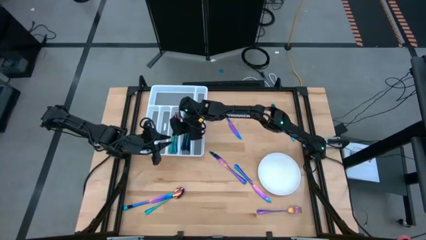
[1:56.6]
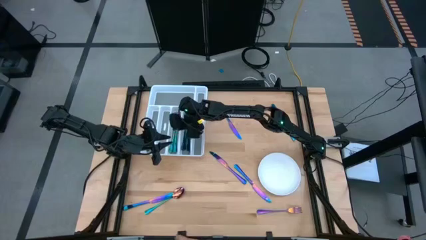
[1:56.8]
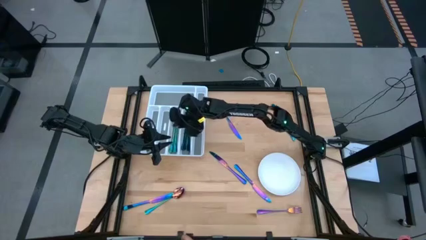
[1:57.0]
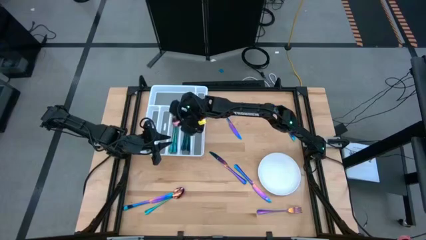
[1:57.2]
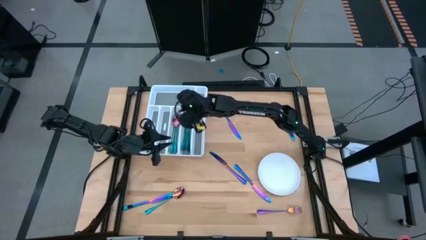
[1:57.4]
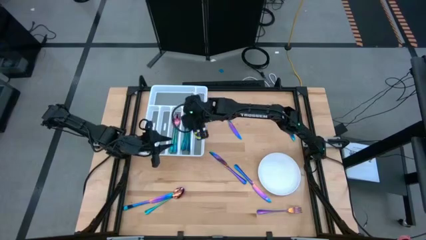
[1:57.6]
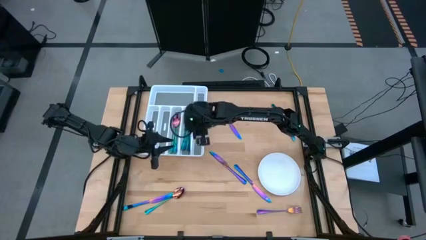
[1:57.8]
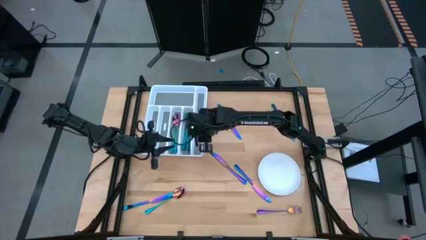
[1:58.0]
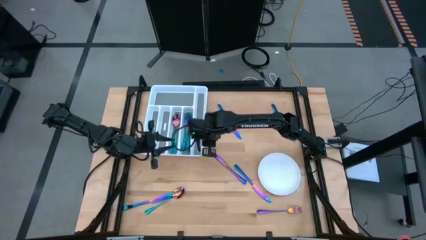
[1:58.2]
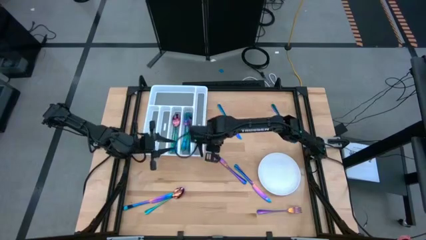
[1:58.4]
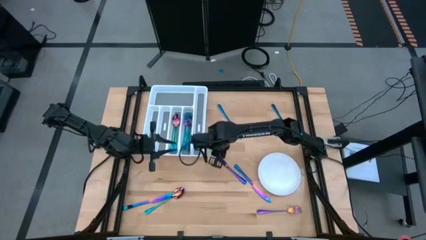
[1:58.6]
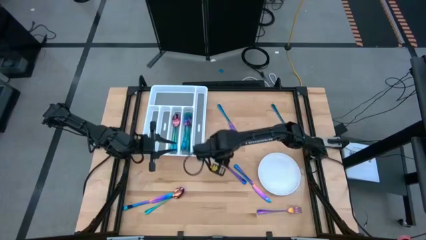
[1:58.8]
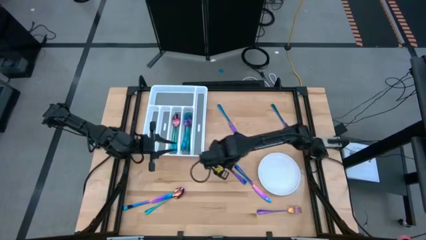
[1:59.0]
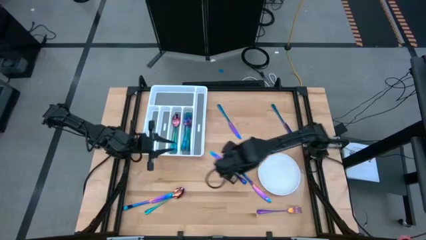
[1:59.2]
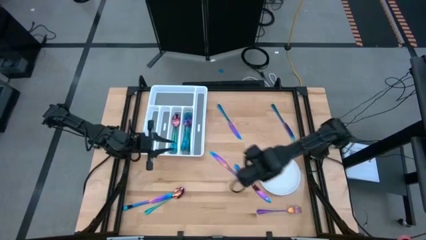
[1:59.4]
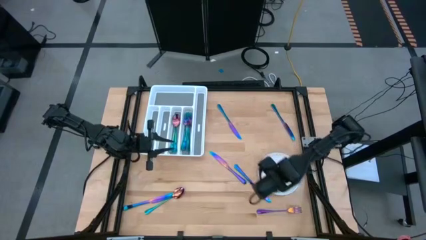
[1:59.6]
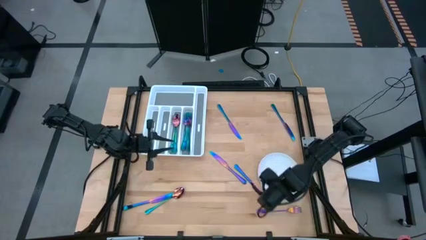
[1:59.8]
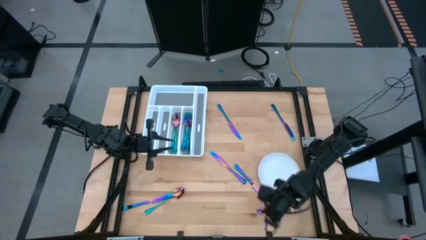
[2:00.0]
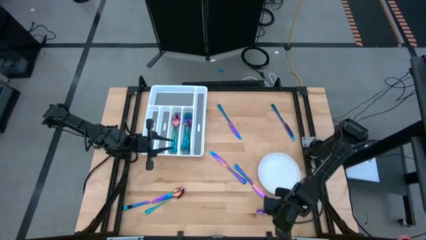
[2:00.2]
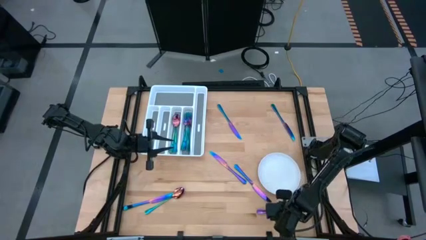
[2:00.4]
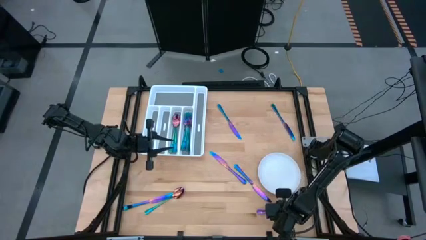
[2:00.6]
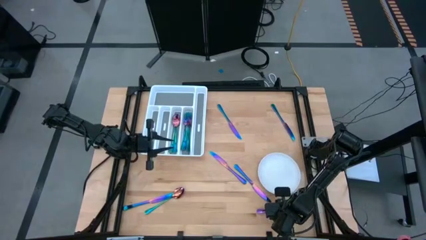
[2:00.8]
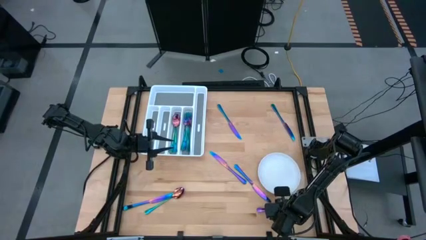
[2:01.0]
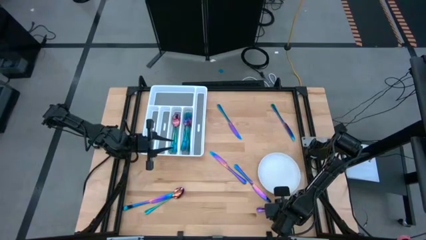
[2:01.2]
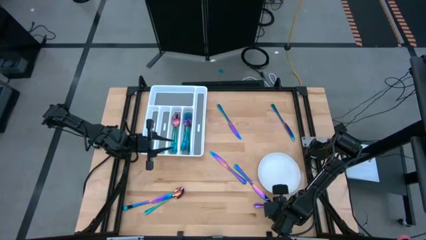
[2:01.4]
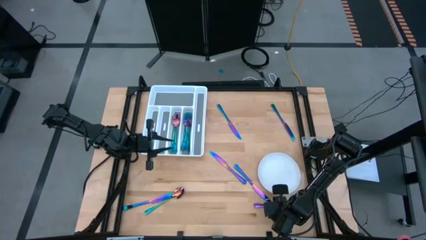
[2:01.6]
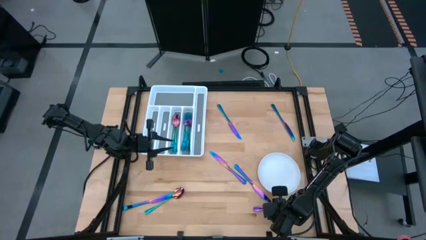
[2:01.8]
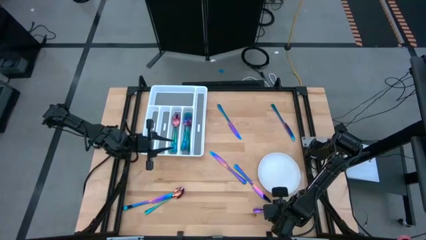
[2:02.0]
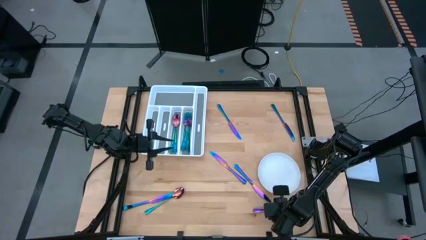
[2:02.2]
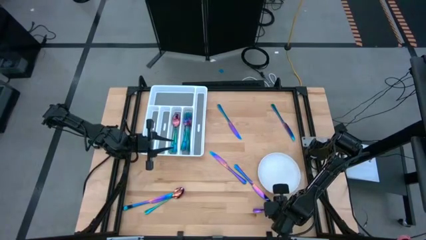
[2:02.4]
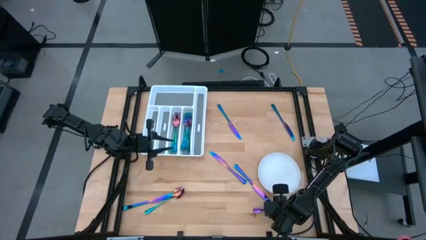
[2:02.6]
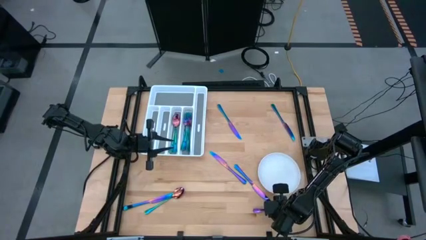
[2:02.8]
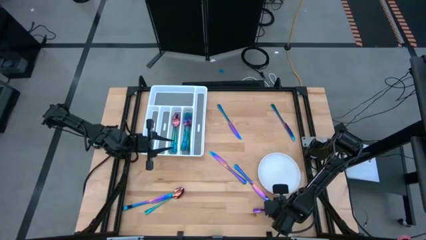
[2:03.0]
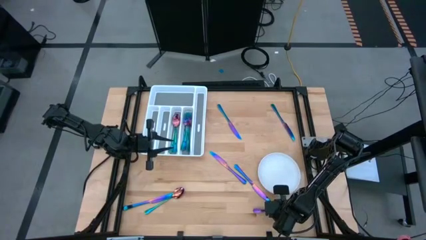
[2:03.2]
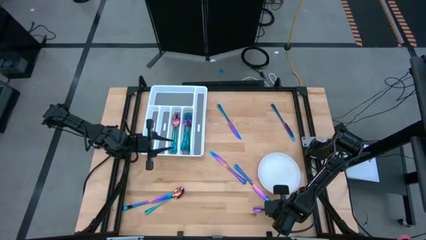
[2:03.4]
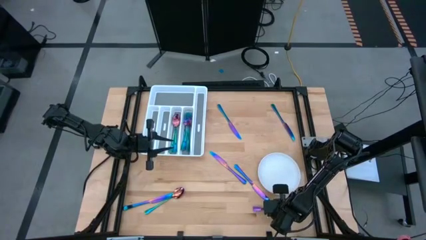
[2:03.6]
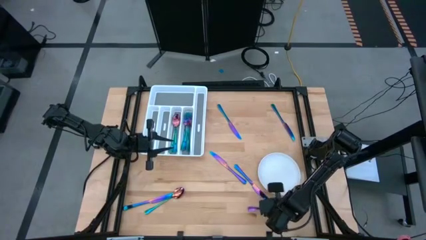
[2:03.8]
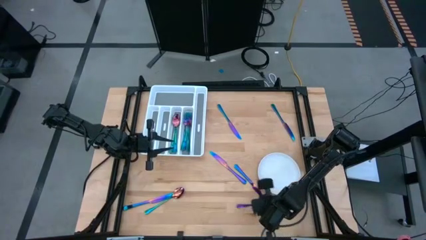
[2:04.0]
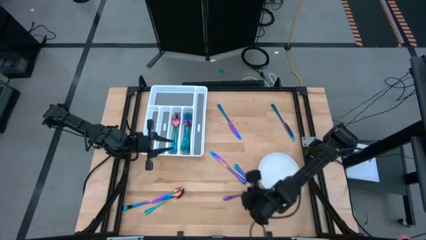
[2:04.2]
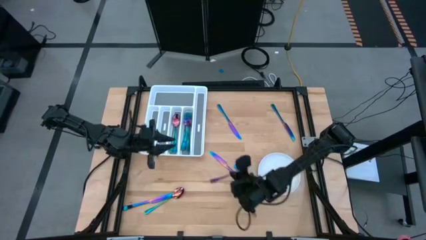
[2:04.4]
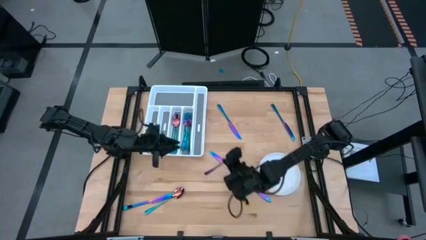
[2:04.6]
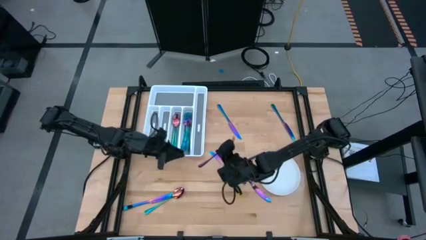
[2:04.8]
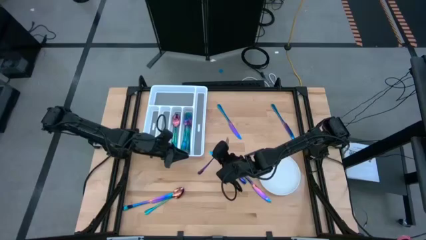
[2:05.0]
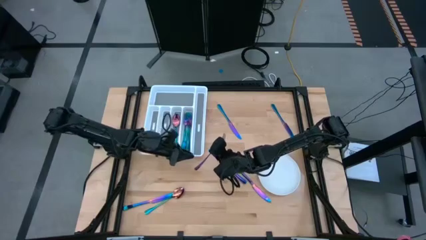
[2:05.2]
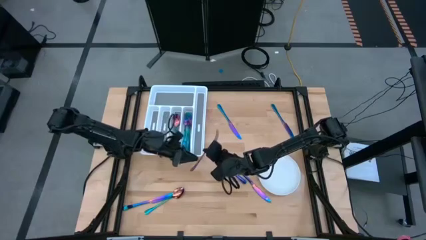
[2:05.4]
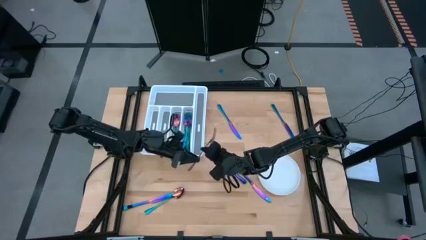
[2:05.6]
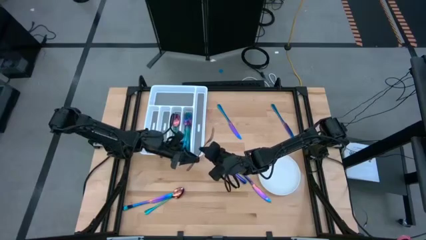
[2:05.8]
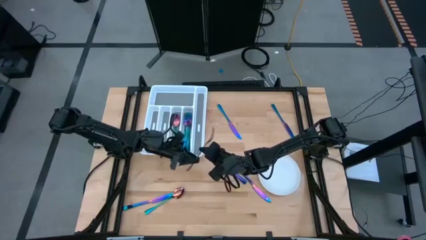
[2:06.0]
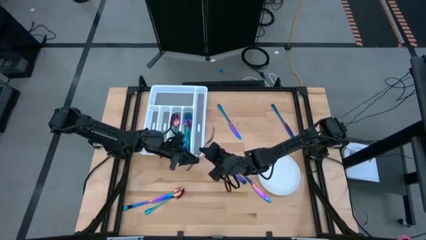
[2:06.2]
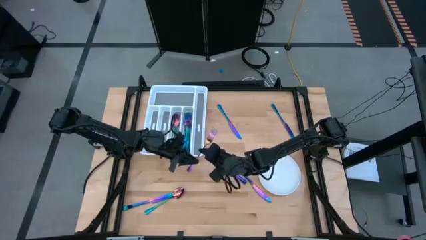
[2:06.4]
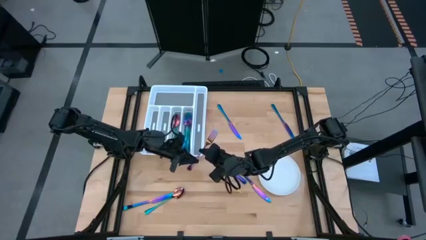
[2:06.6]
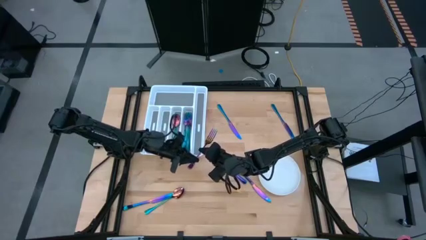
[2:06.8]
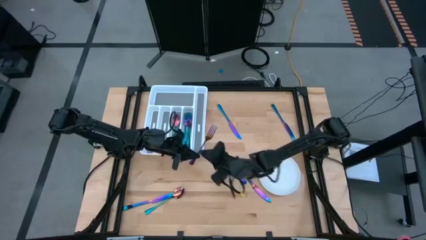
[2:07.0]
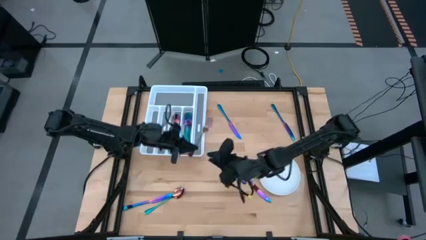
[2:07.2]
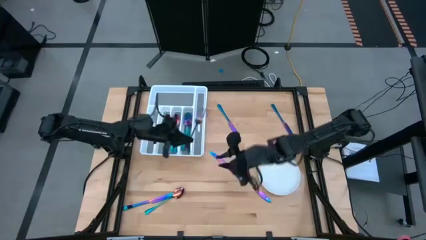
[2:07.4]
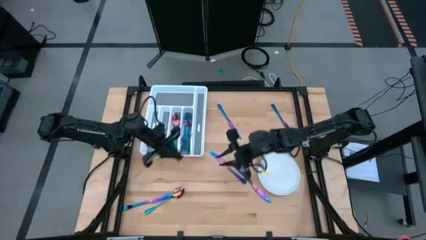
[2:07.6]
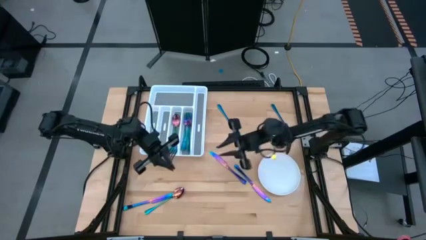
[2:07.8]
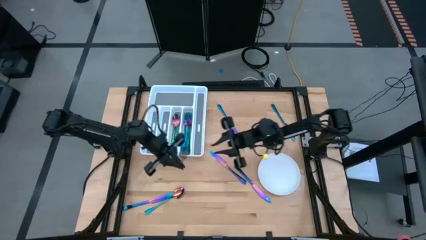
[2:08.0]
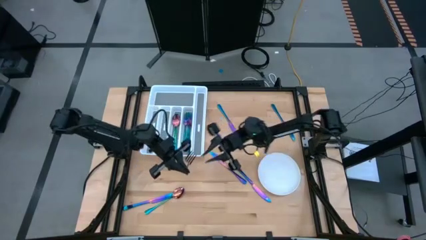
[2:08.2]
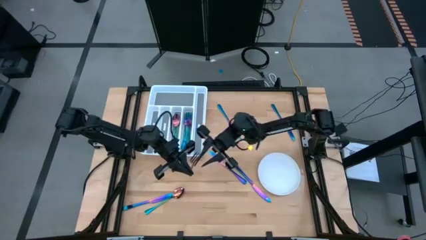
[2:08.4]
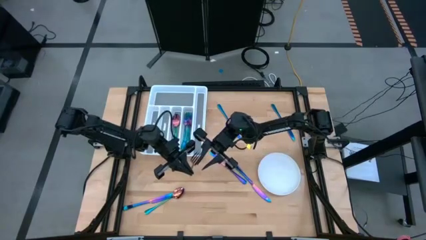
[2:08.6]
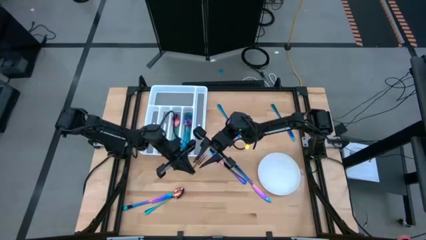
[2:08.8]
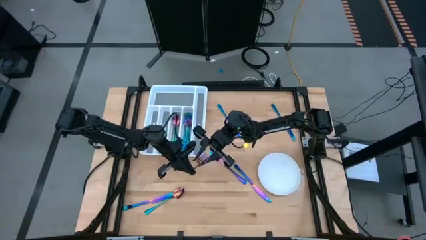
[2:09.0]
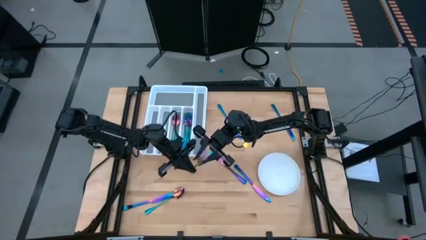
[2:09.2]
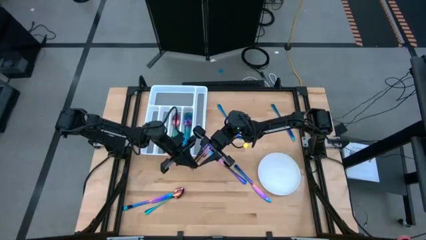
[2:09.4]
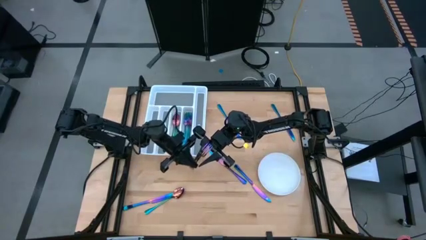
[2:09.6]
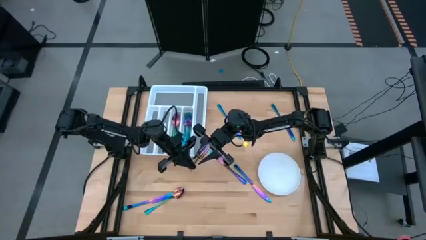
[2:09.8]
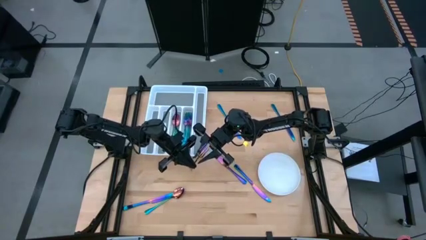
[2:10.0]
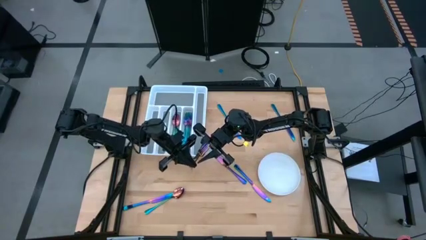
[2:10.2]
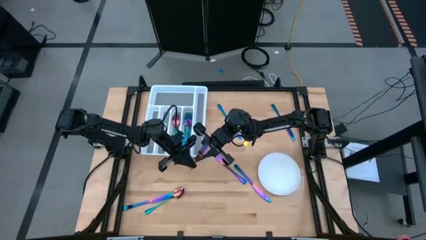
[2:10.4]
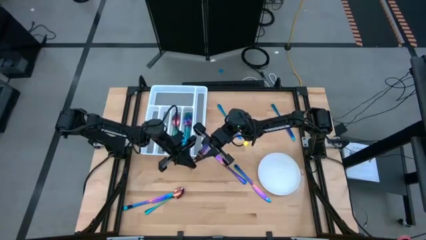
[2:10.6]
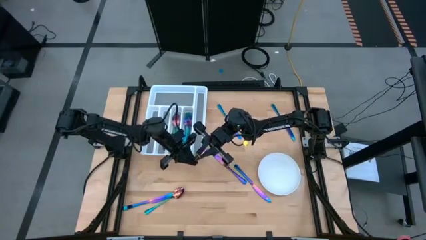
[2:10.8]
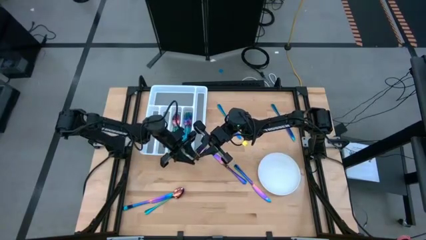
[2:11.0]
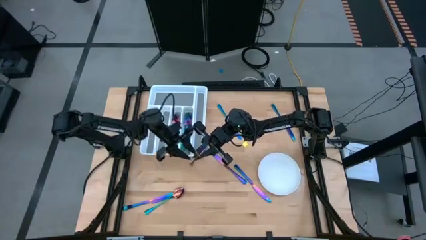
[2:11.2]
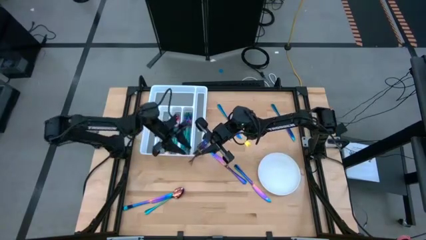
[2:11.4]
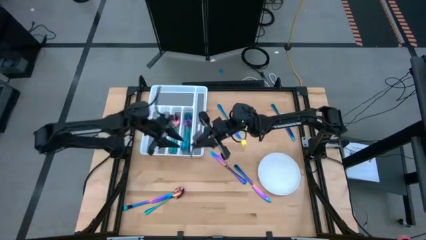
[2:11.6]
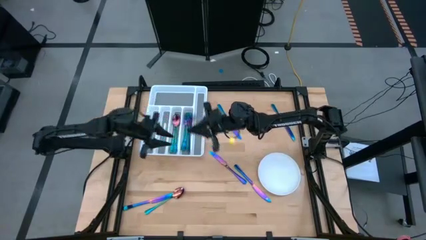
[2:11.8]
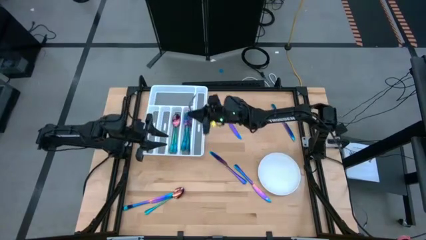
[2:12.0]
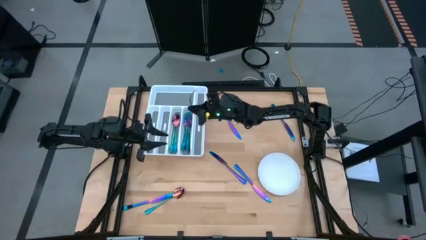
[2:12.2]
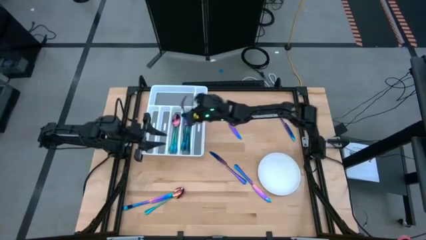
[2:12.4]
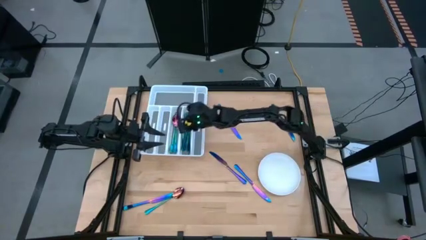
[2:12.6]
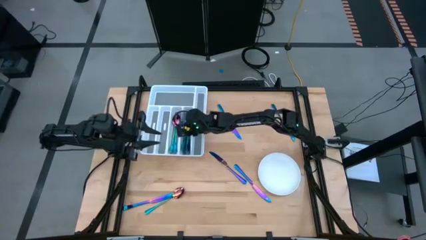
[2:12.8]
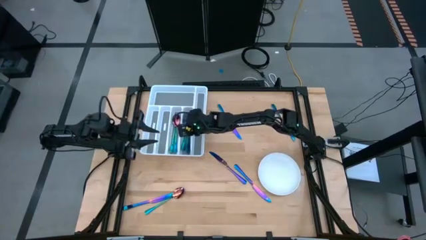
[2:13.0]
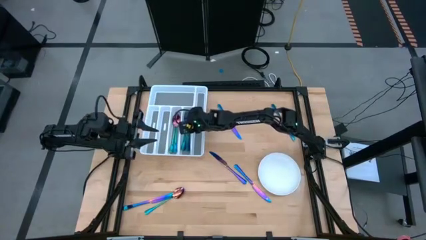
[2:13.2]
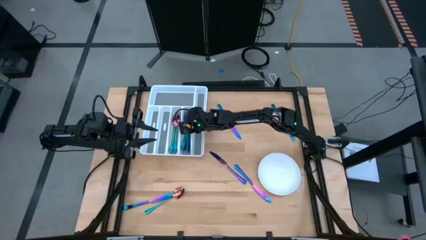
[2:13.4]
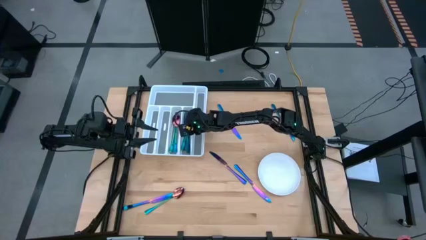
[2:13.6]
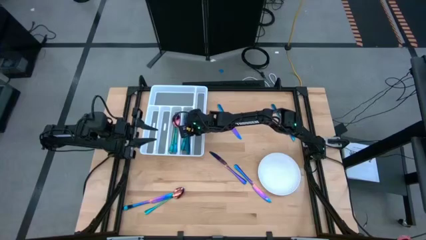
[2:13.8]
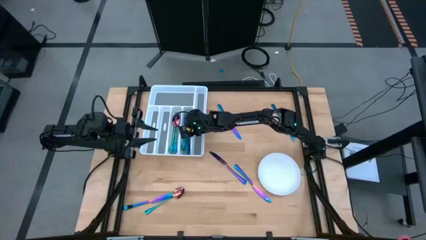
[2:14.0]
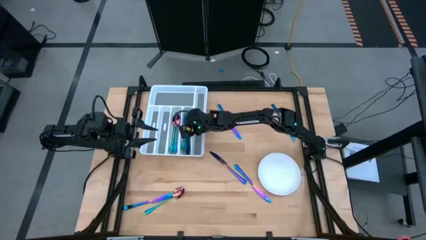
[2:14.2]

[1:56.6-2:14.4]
Task: Sort silverware
Put the iridescent fork into the white silverware tray
